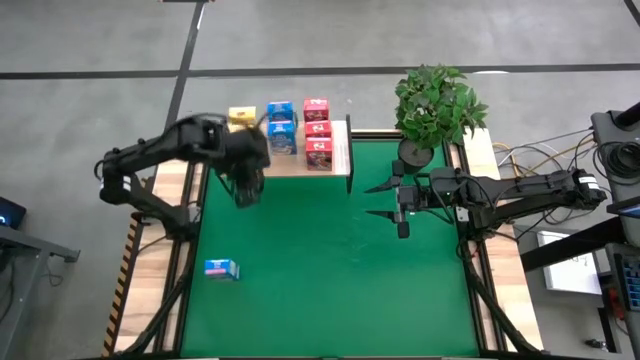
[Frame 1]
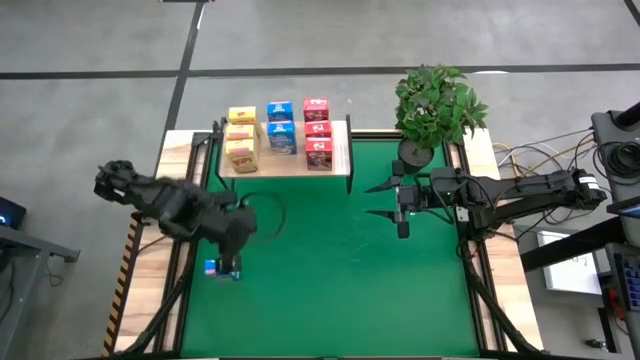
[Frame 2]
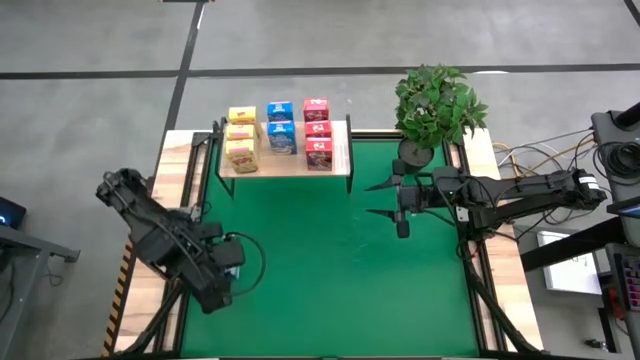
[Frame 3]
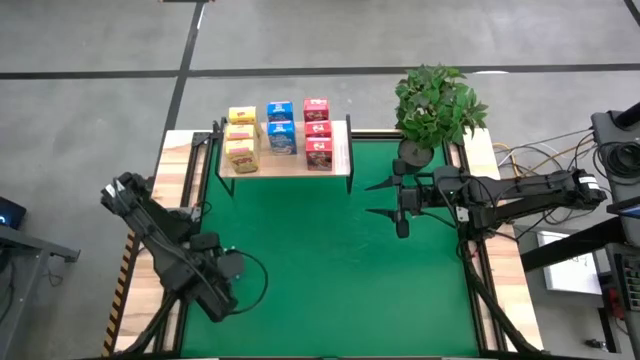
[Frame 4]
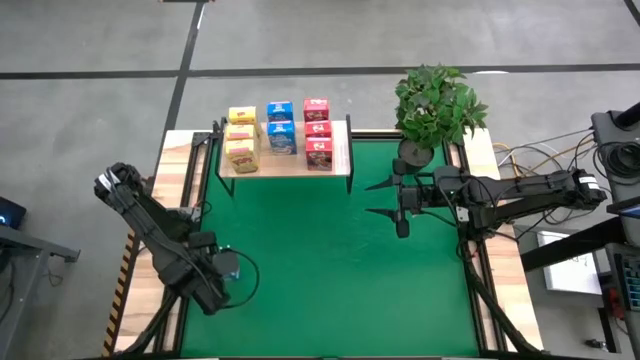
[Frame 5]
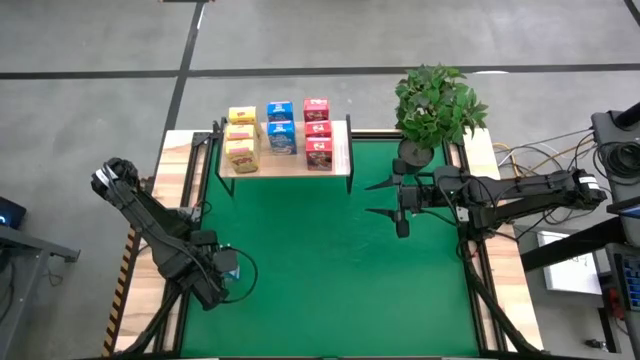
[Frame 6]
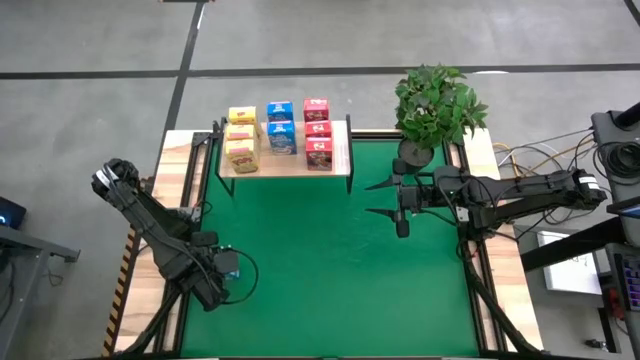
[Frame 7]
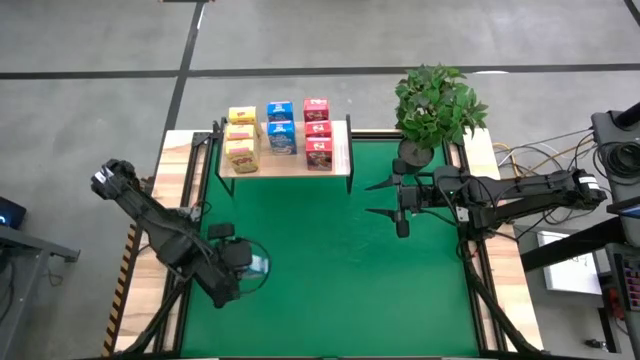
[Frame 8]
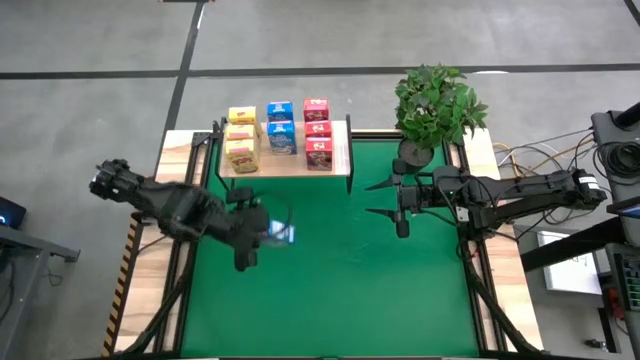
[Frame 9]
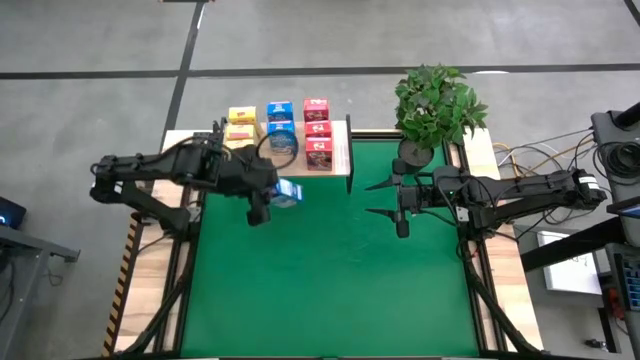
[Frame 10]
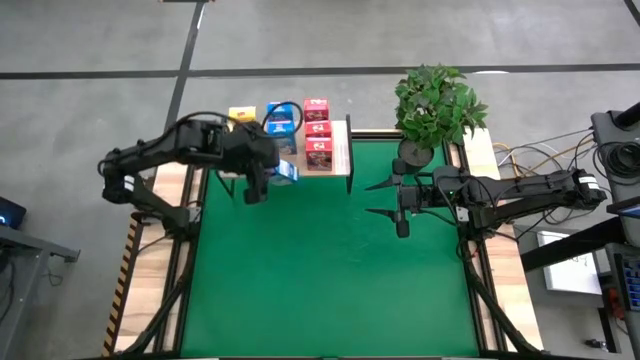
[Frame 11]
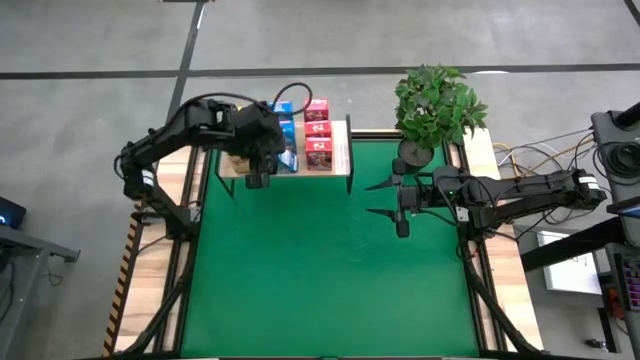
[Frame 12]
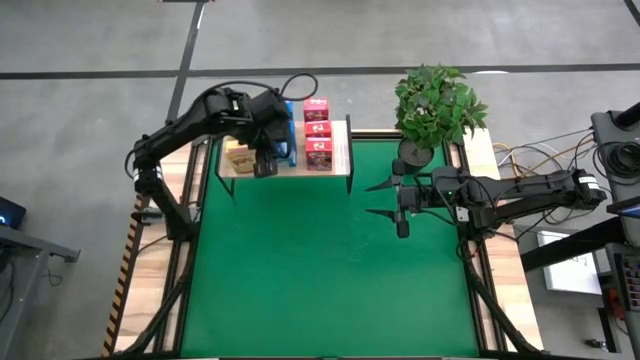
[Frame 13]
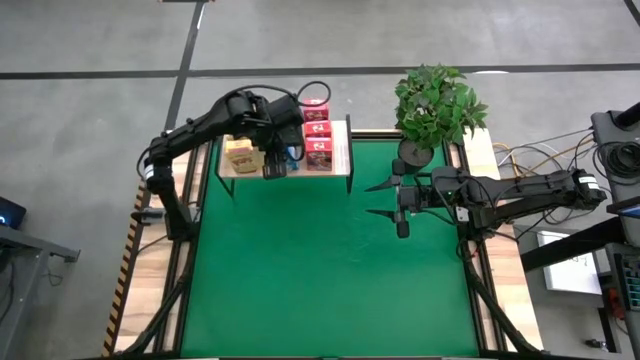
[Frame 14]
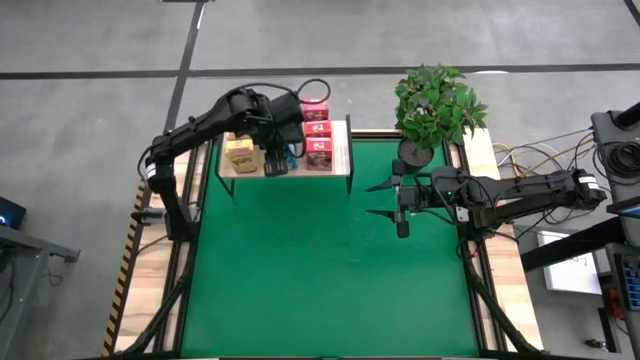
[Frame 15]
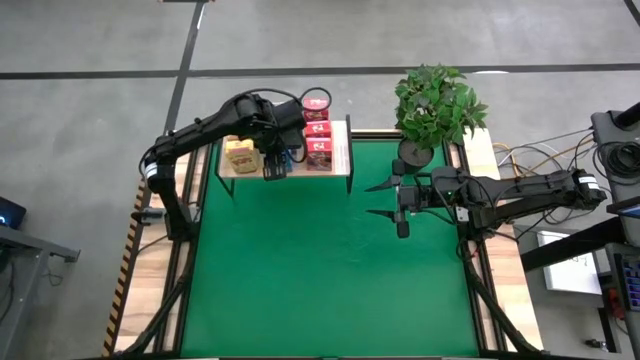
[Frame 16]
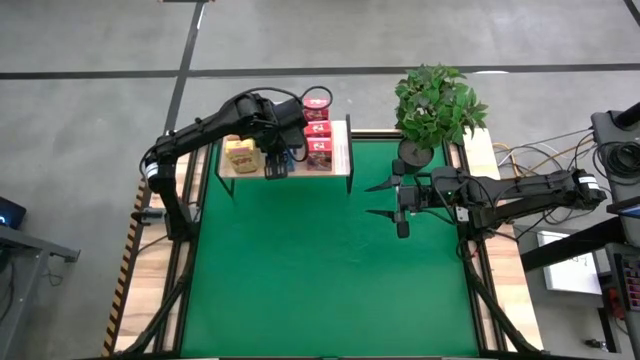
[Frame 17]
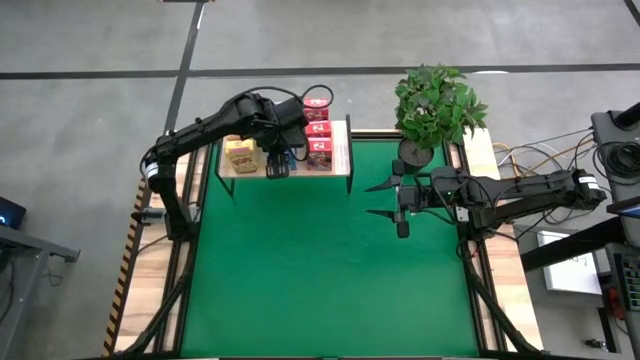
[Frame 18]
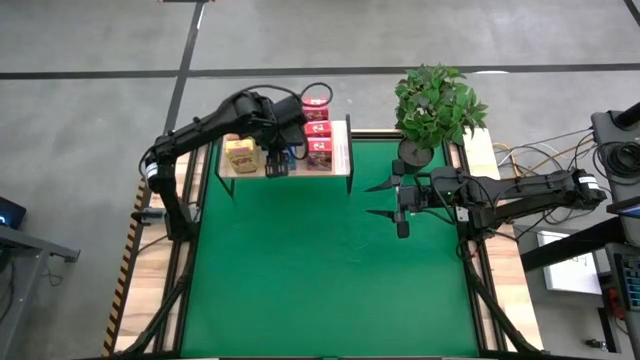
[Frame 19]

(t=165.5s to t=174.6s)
Task: Stack cereal on shelf
Put the blue cereal on the shelf

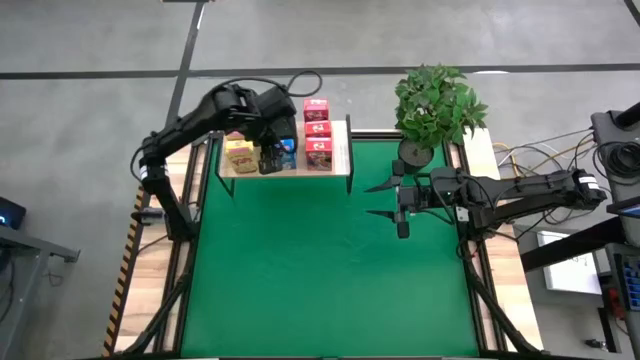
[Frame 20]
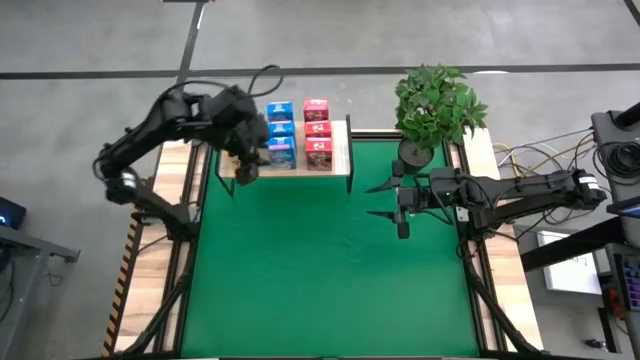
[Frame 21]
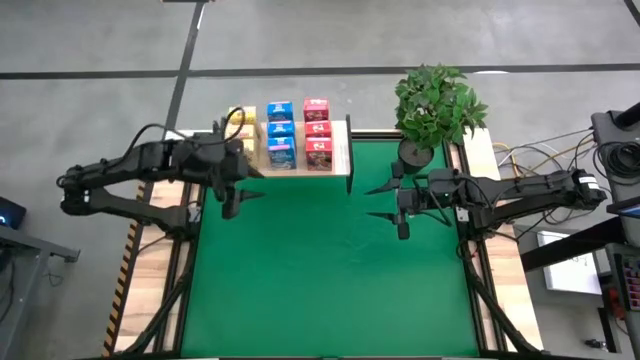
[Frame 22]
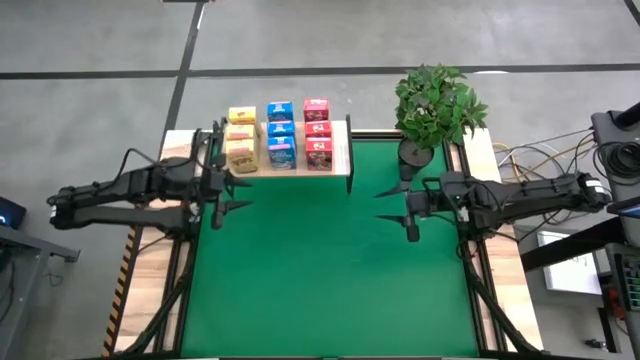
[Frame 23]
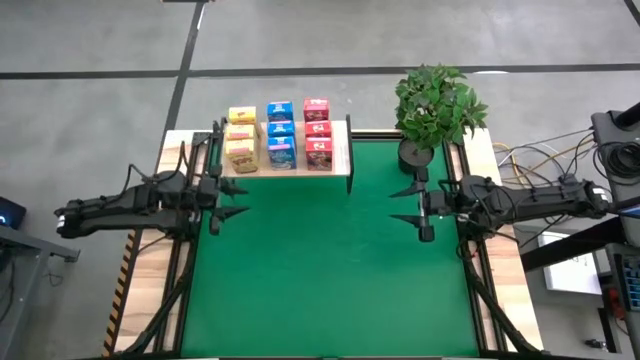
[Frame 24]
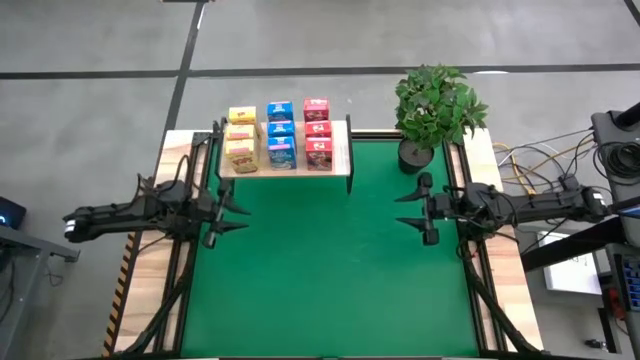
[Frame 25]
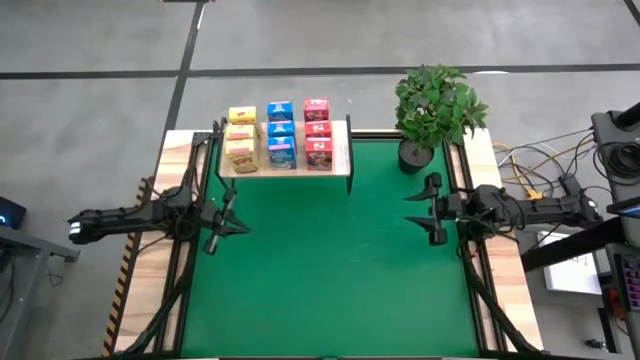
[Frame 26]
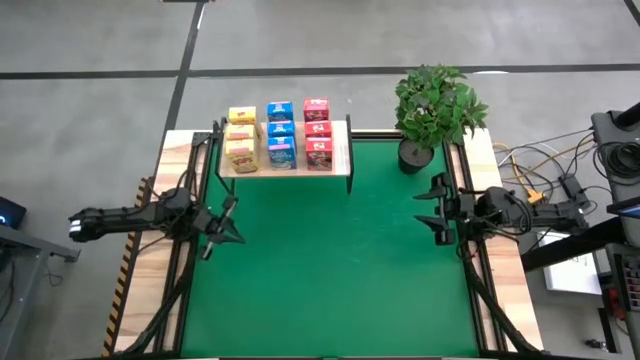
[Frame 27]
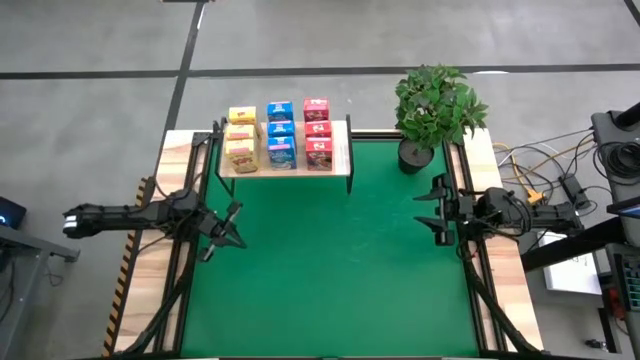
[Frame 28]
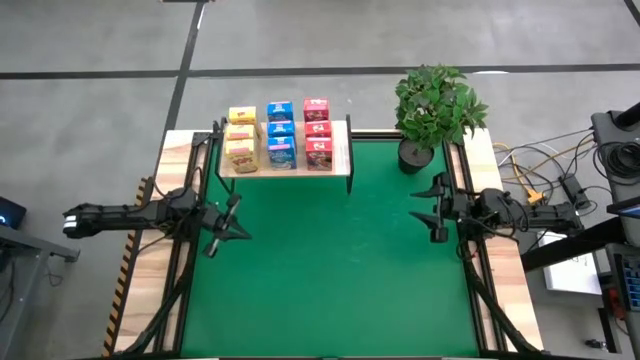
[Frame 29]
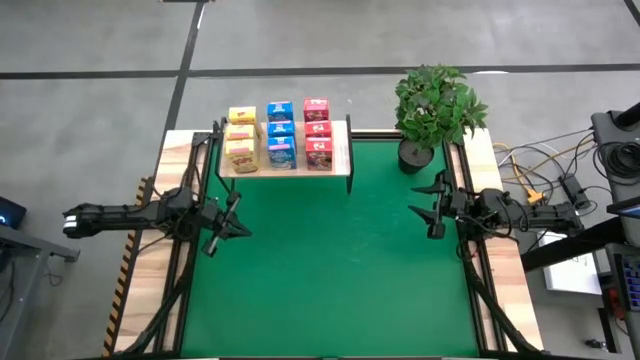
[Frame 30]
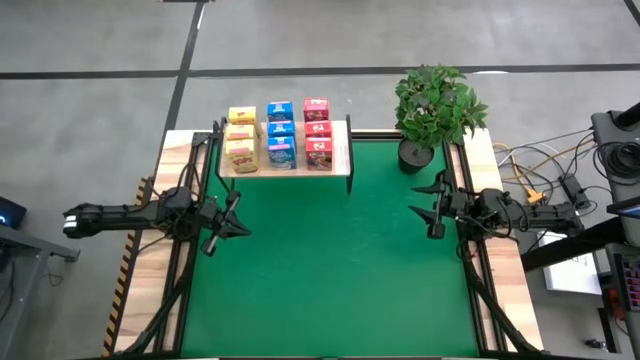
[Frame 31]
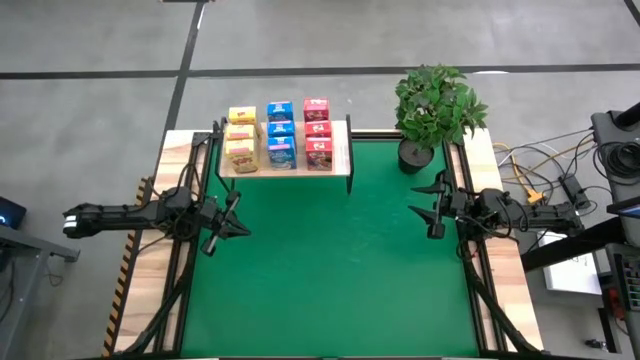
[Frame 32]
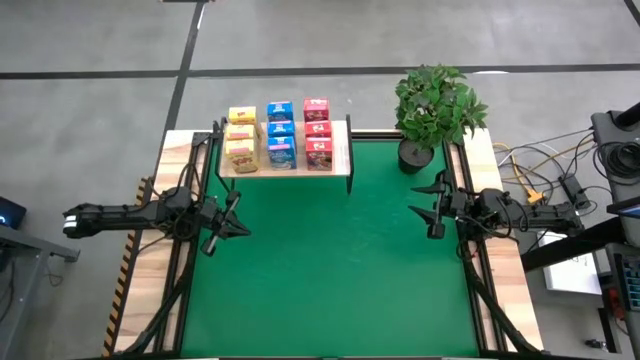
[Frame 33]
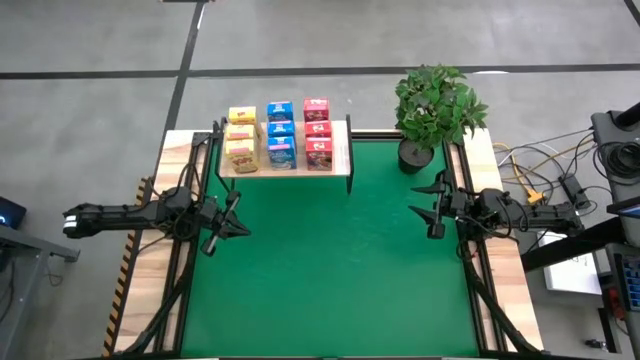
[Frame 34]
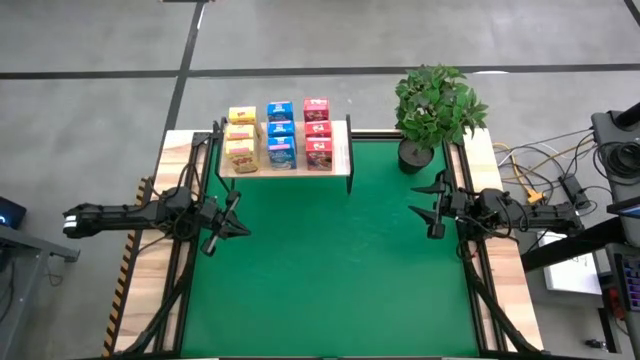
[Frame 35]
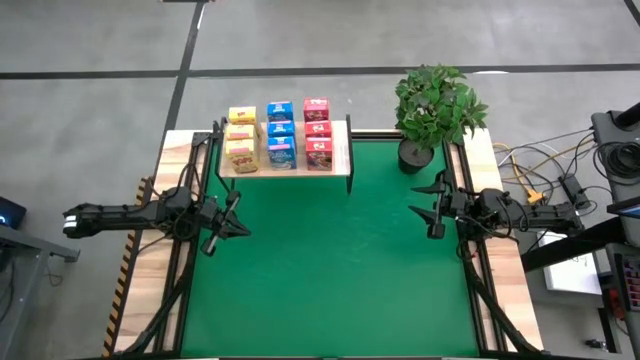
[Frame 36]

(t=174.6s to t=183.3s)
Return to home position

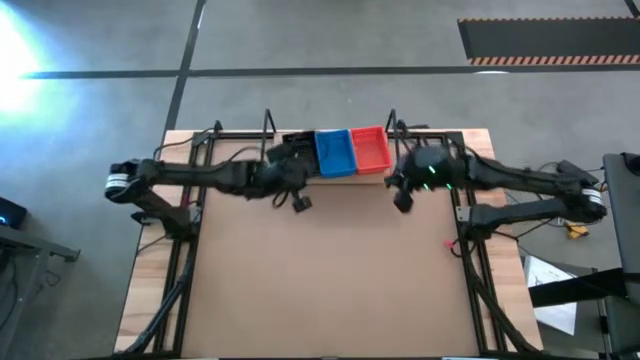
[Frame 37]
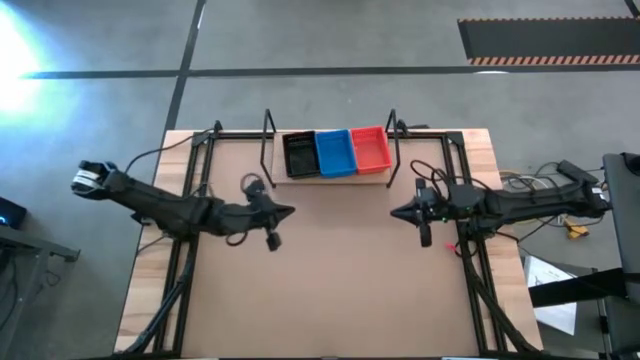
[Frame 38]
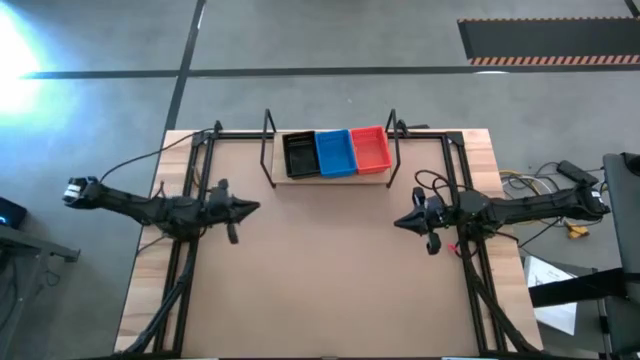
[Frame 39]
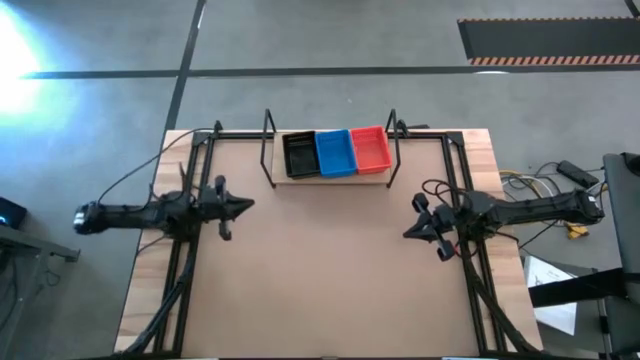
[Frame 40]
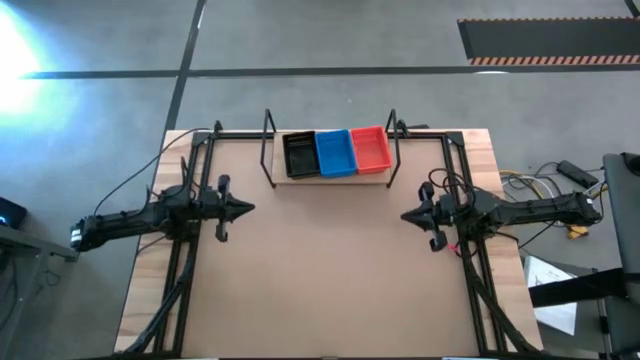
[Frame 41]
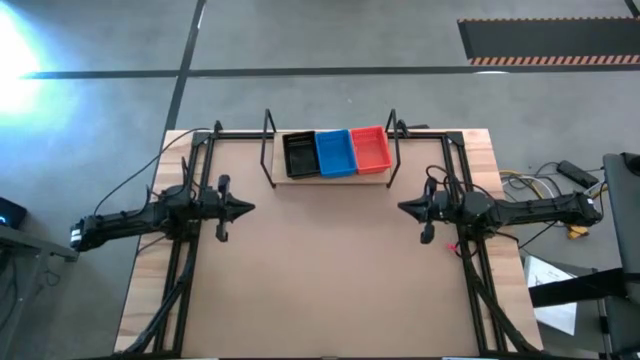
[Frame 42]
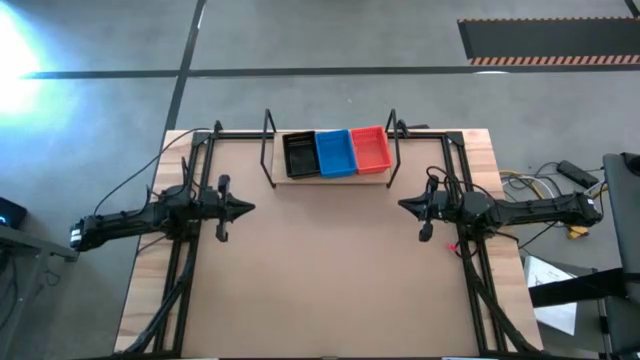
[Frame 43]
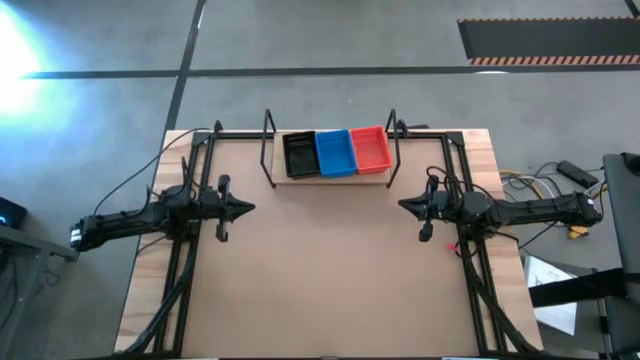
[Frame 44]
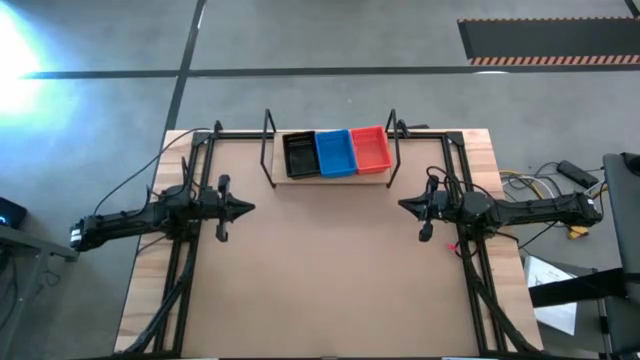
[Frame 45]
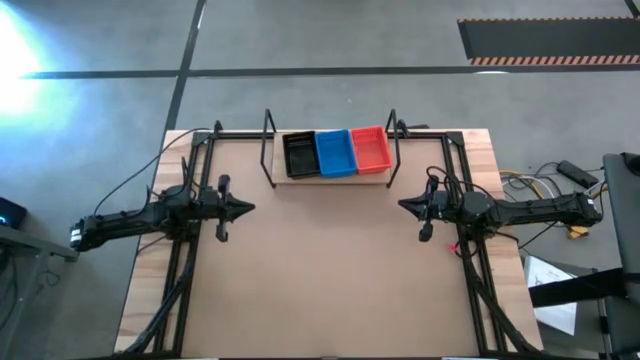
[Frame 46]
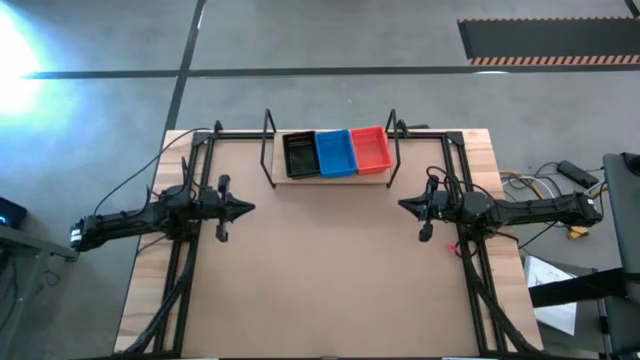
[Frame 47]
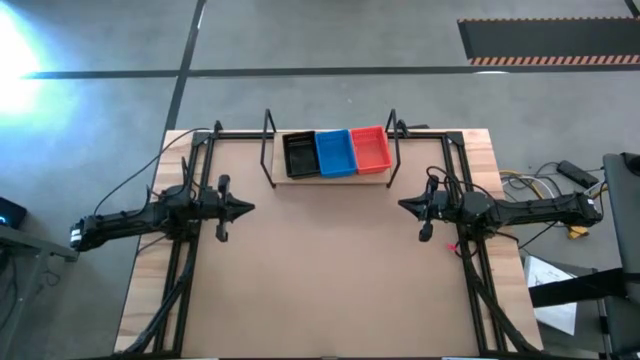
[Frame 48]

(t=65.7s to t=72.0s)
Task: Stack baskets on shelf by color
Return to Home Position
